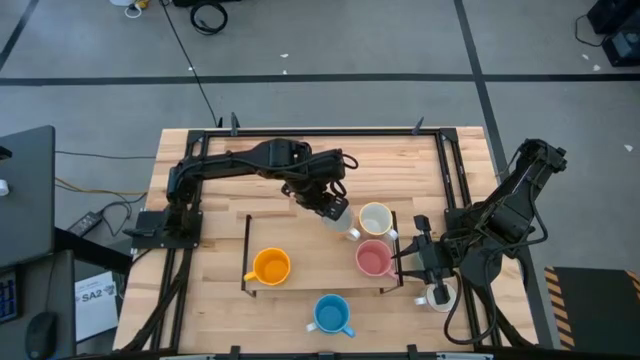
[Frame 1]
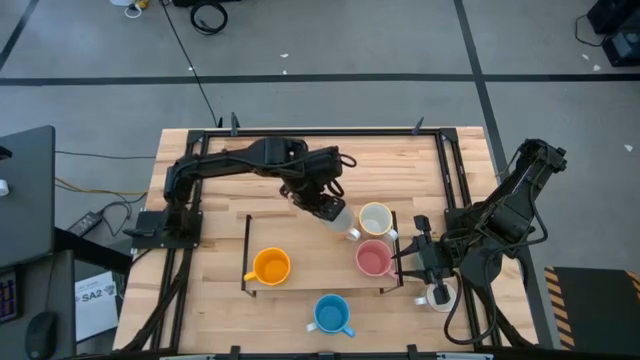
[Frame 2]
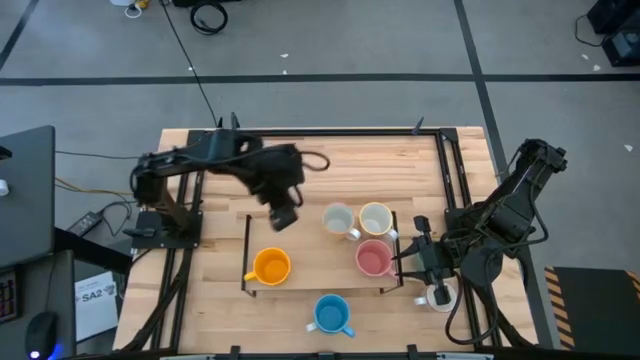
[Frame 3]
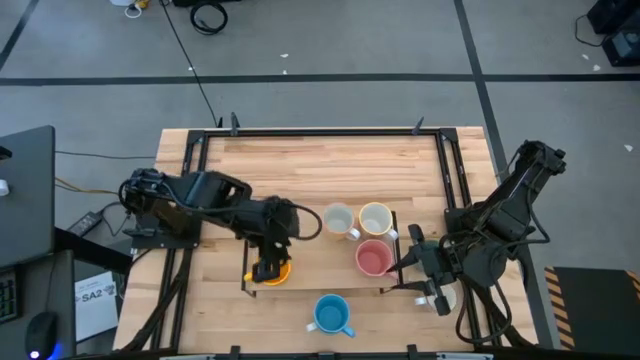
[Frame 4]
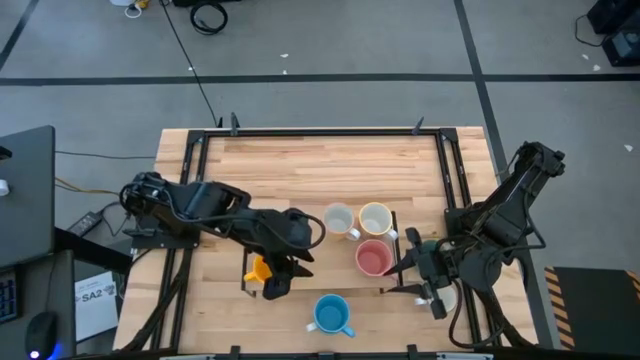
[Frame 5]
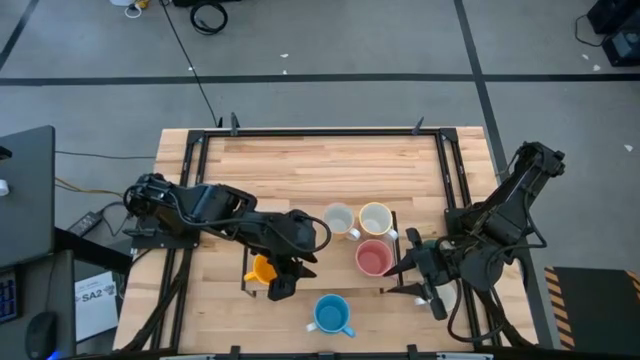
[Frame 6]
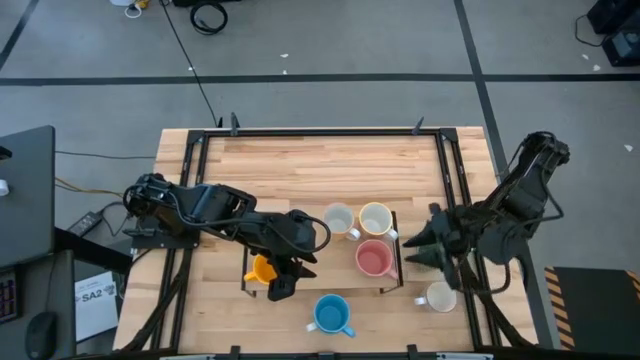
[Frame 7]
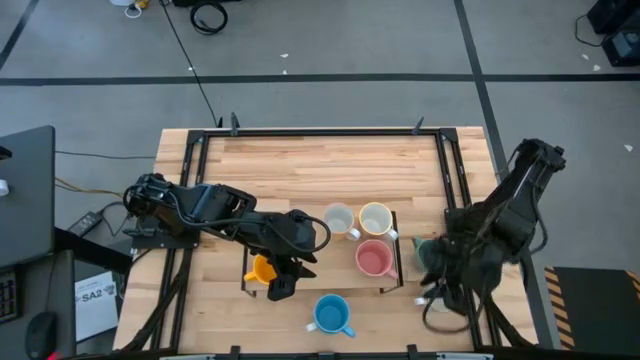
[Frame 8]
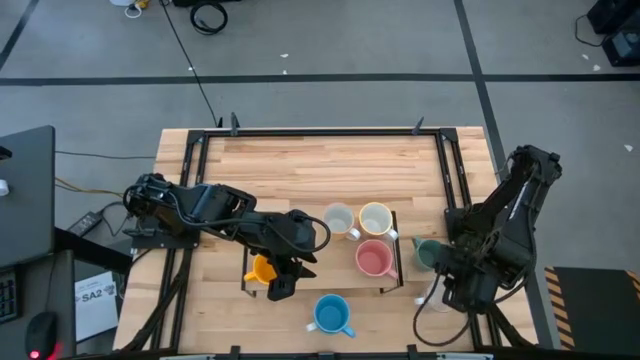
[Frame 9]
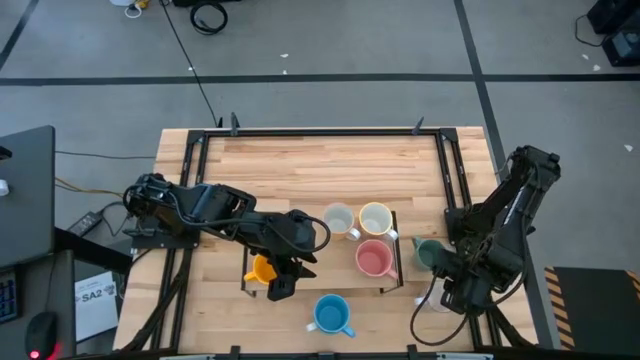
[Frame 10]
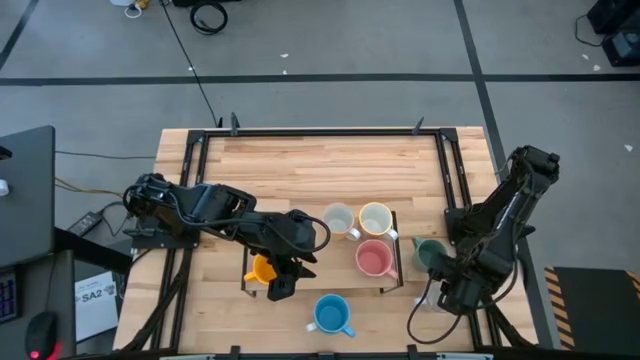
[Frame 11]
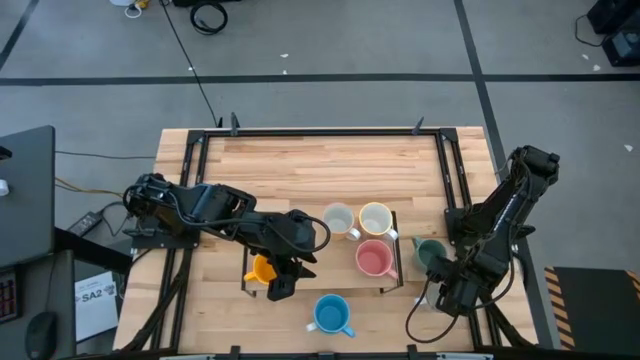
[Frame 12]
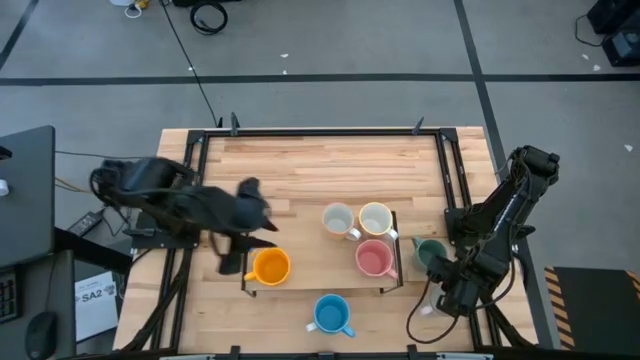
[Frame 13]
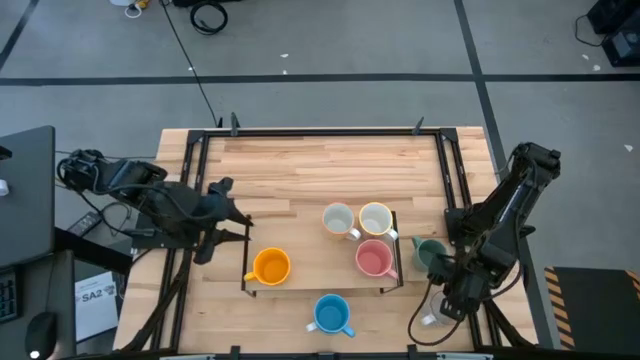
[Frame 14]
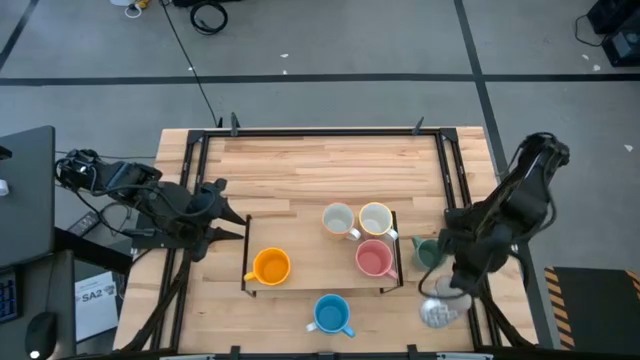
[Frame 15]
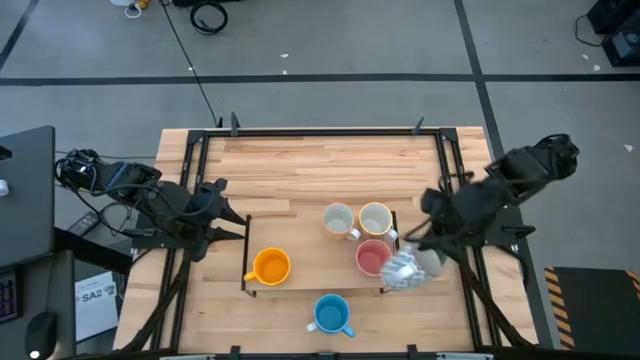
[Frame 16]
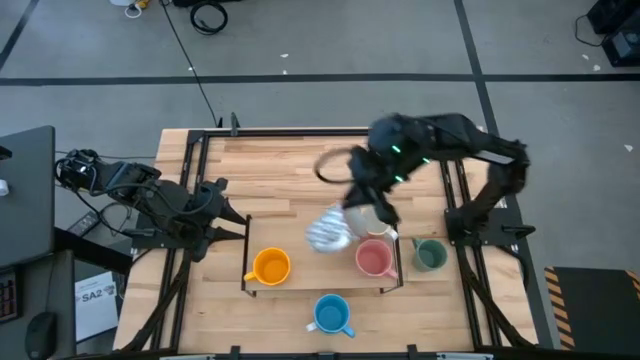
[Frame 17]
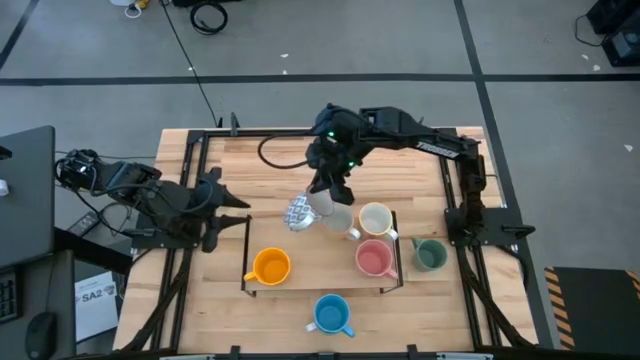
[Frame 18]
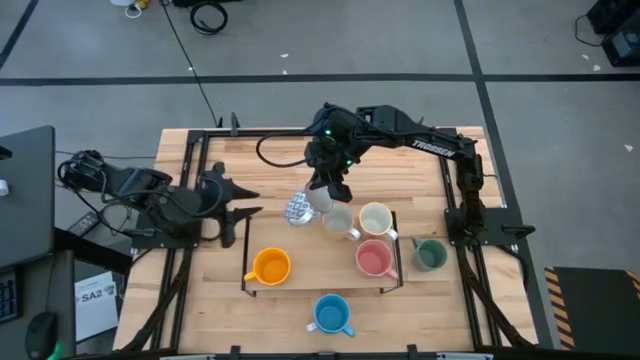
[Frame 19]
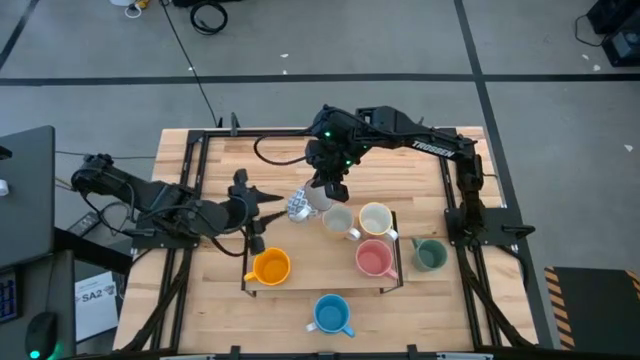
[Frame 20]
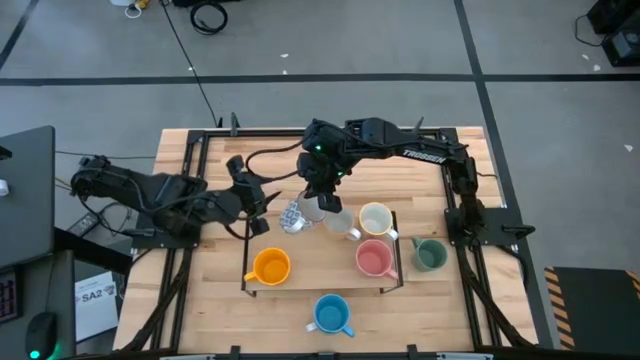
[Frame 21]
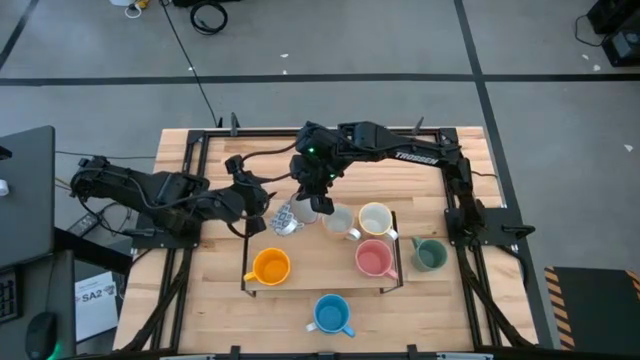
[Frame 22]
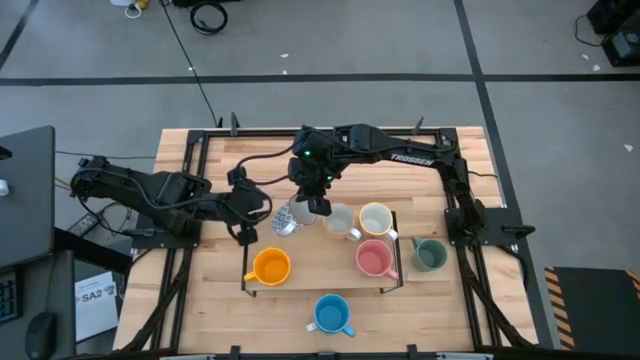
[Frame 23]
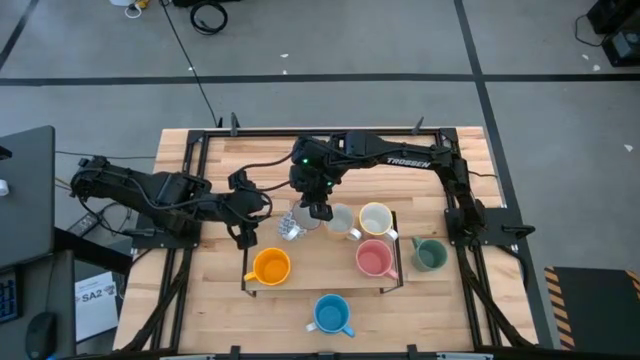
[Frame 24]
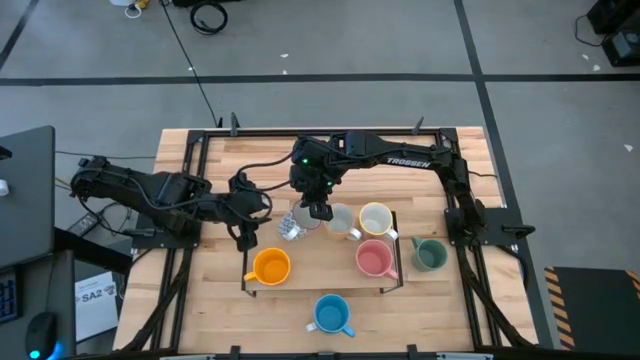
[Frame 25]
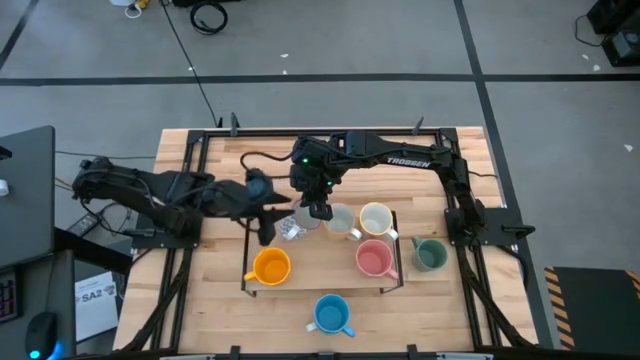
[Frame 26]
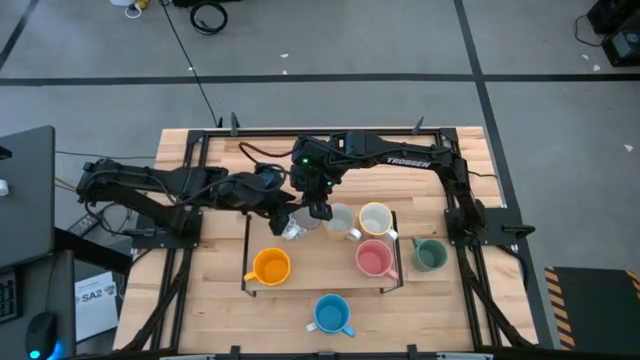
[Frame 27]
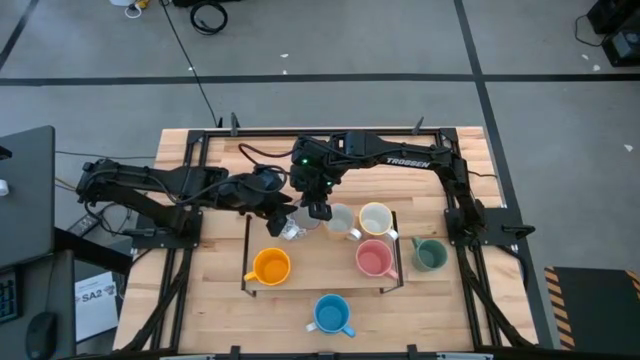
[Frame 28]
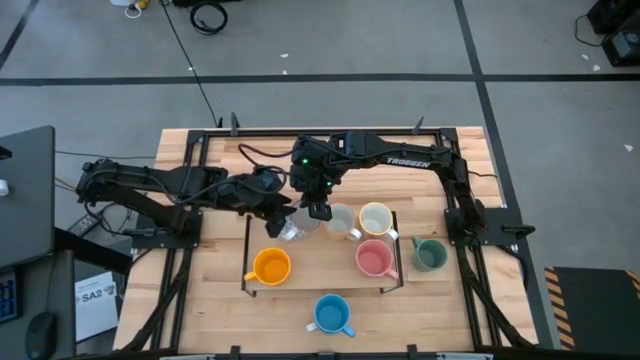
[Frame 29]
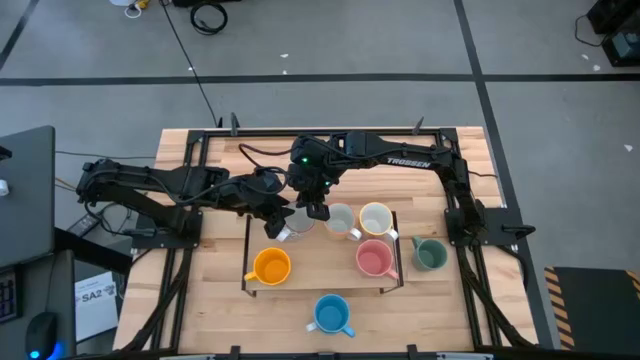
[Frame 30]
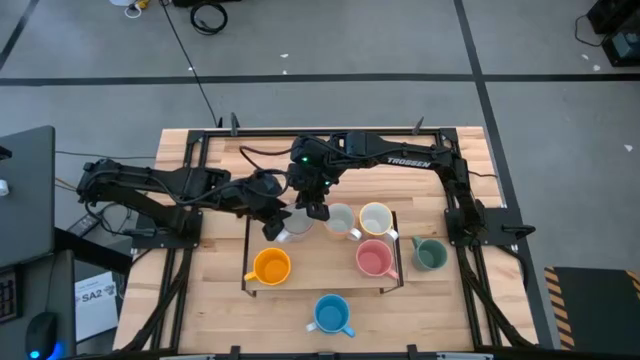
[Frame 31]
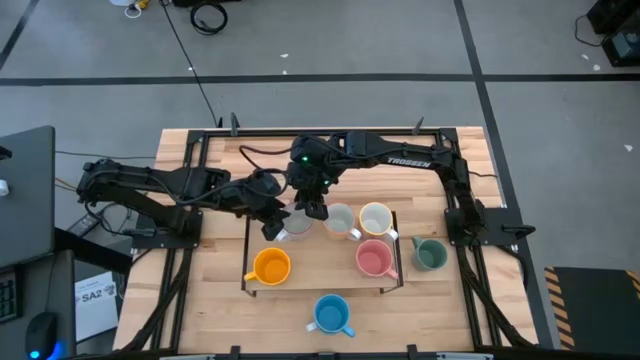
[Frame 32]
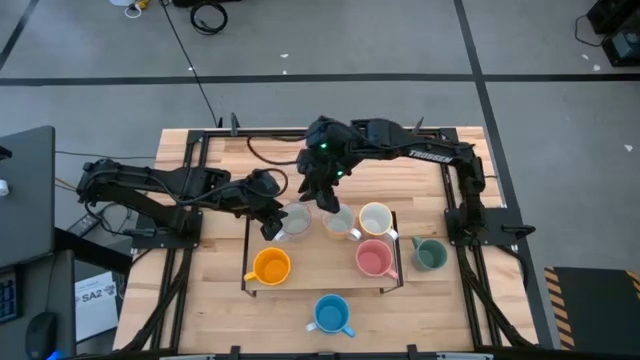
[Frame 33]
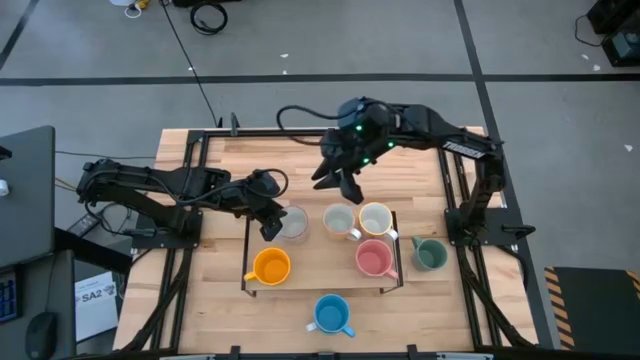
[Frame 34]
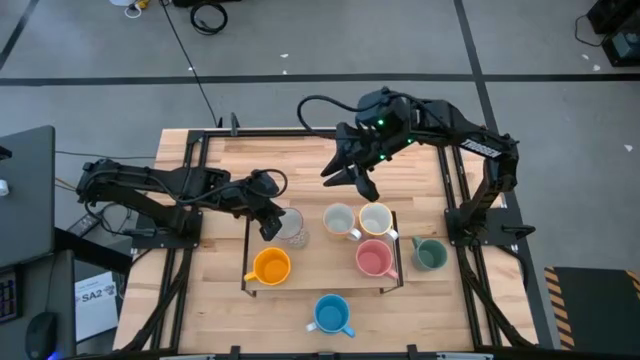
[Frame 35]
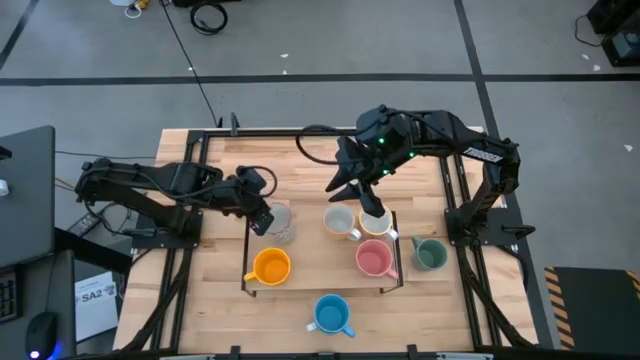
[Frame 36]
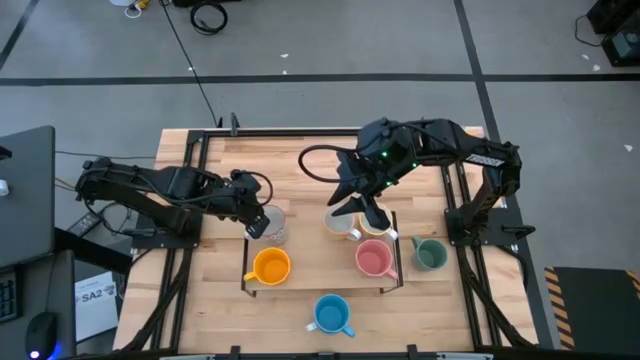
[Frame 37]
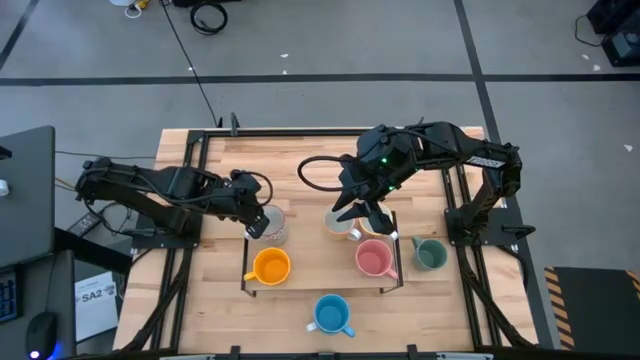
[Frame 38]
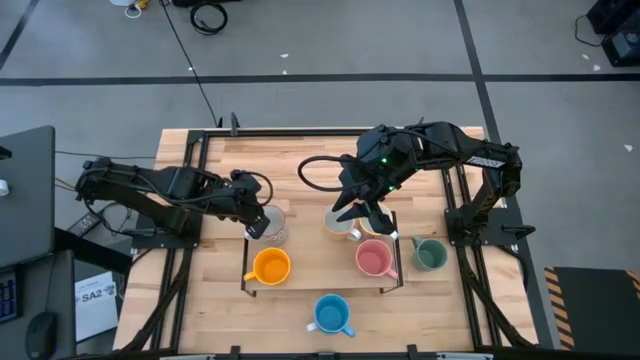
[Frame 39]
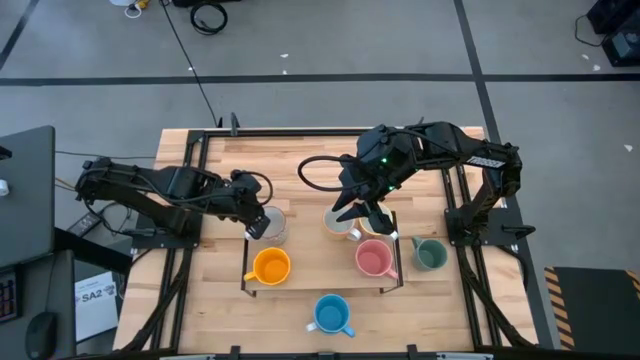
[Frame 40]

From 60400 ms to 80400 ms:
Task: Place coffee mugs
Put the gray patterned mug on the shelf

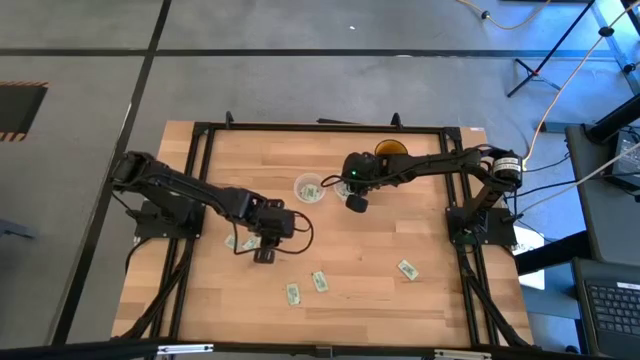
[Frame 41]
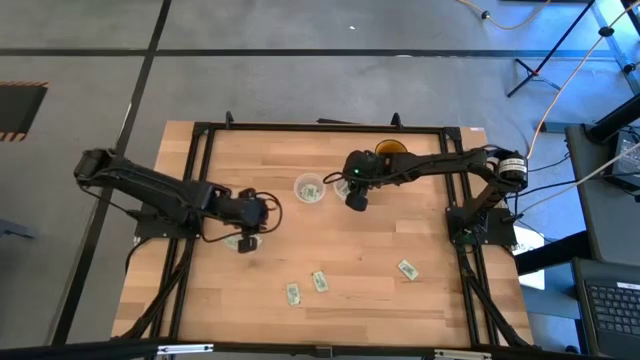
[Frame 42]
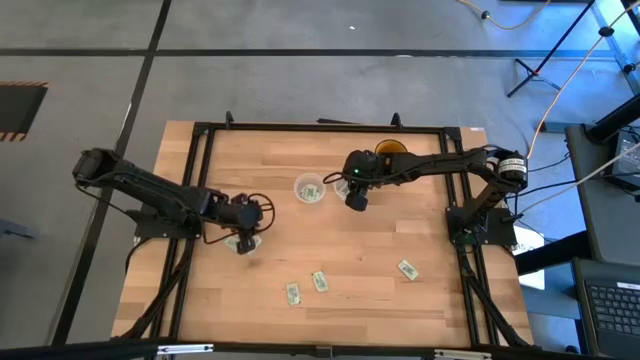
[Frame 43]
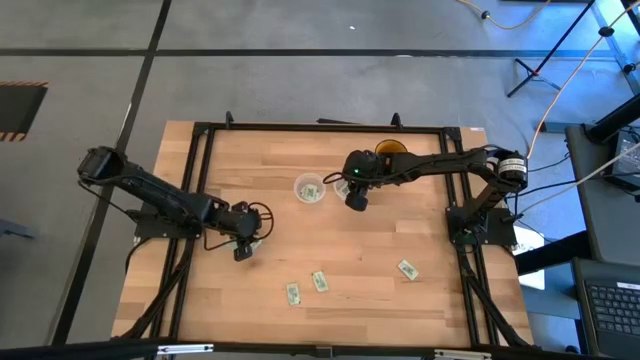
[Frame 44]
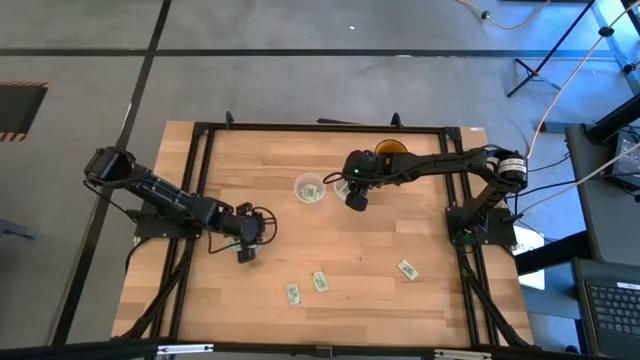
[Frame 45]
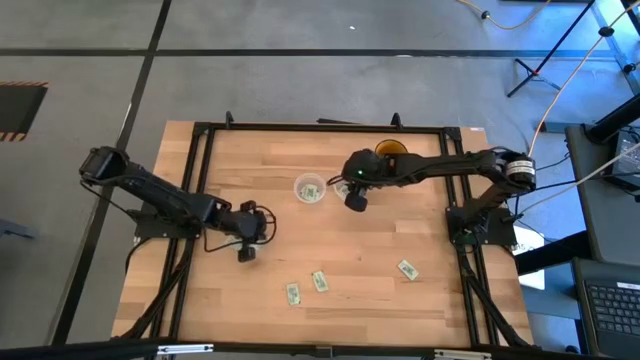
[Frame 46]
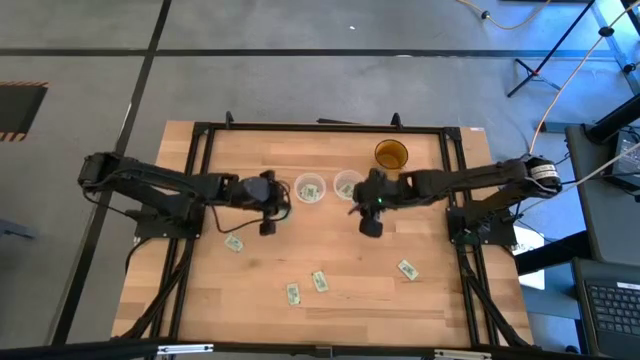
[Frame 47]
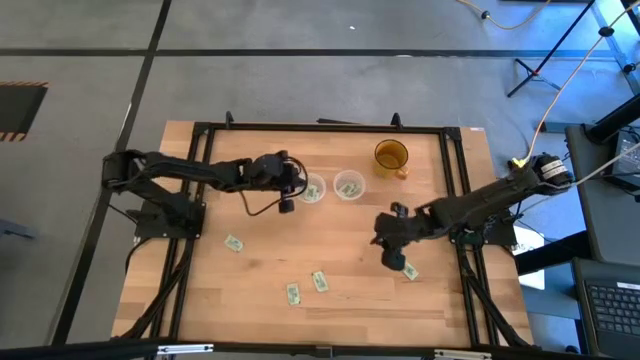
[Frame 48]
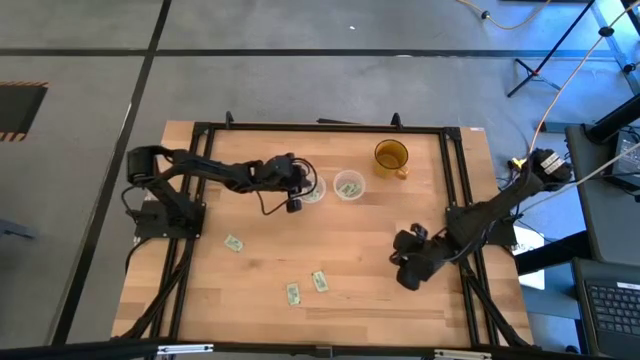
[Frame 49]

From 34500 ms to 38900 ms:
Task: Pick and place Stevia / Truvia into bins
Put the stevia packet into the left transparent container
